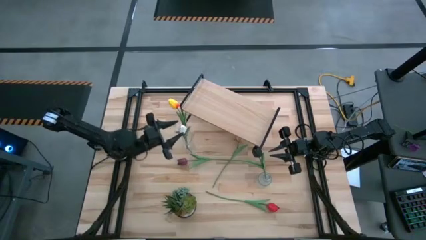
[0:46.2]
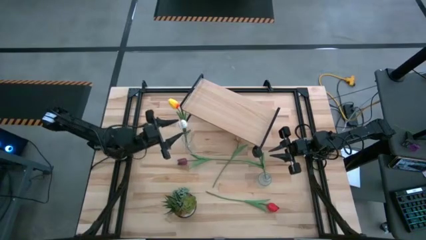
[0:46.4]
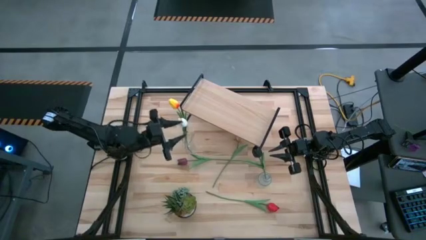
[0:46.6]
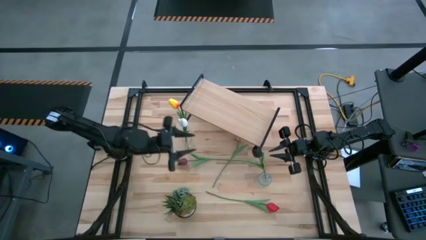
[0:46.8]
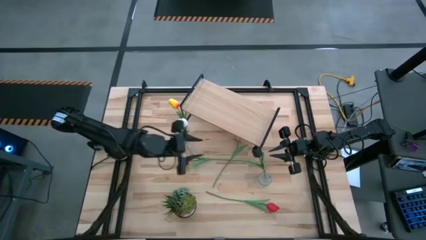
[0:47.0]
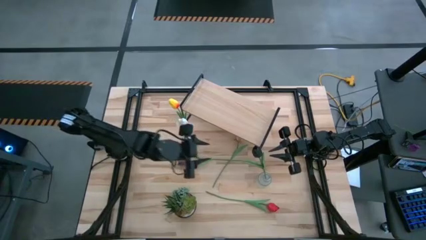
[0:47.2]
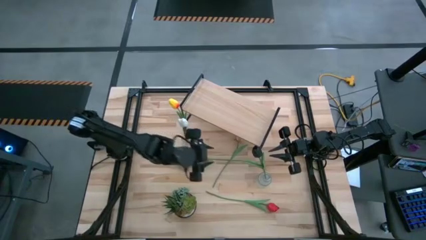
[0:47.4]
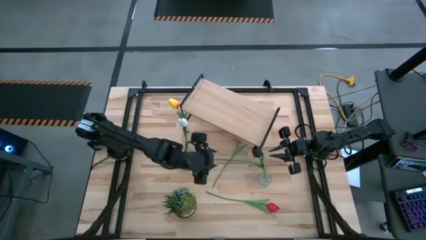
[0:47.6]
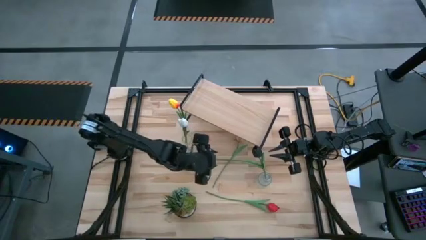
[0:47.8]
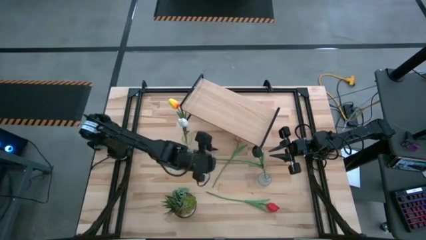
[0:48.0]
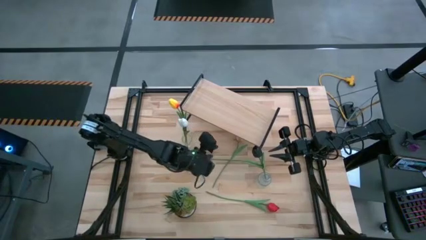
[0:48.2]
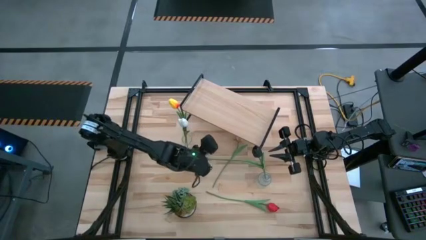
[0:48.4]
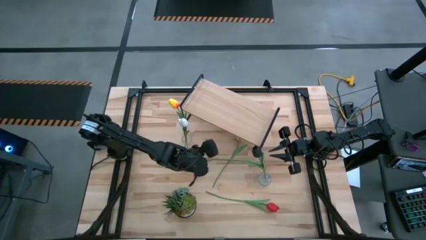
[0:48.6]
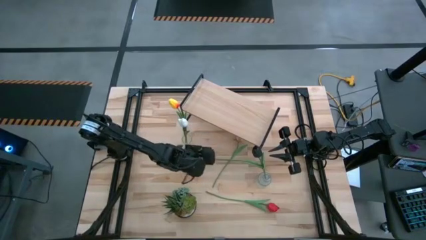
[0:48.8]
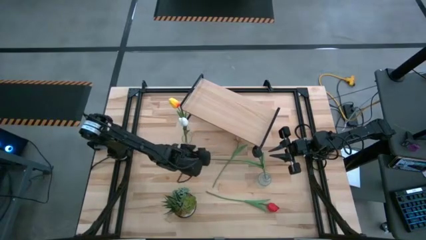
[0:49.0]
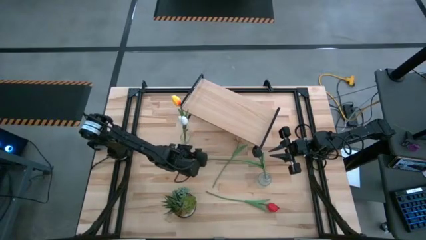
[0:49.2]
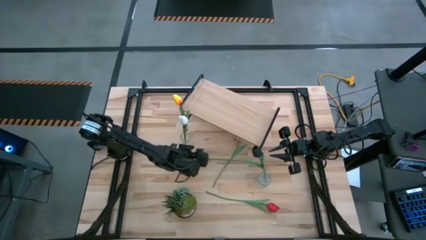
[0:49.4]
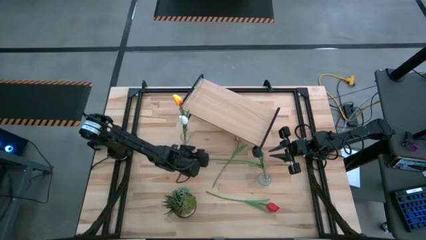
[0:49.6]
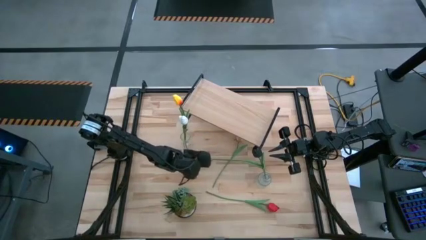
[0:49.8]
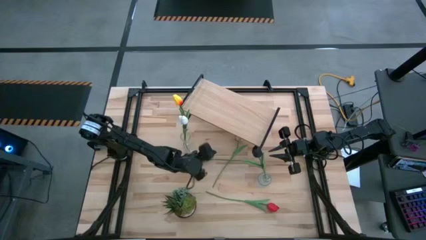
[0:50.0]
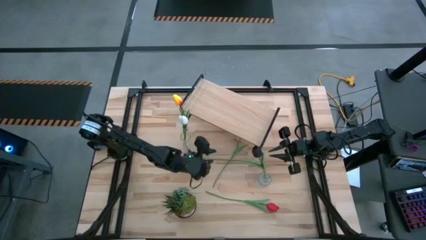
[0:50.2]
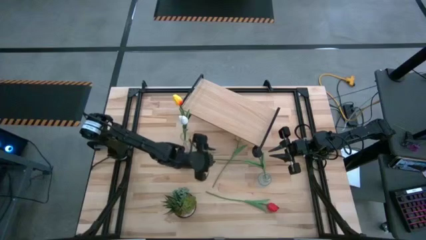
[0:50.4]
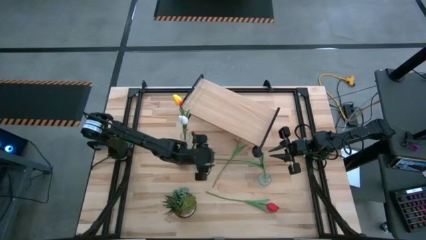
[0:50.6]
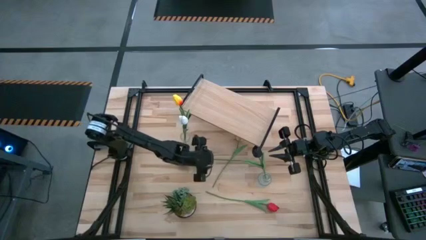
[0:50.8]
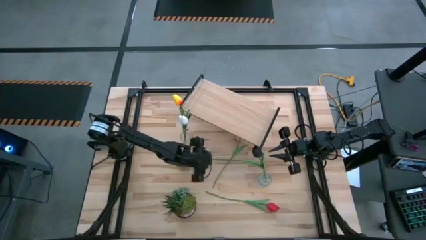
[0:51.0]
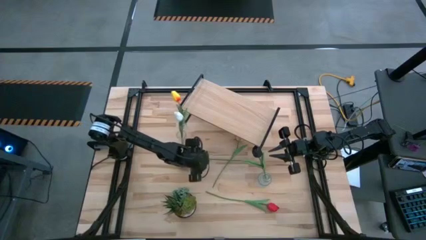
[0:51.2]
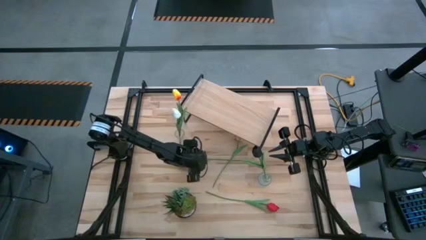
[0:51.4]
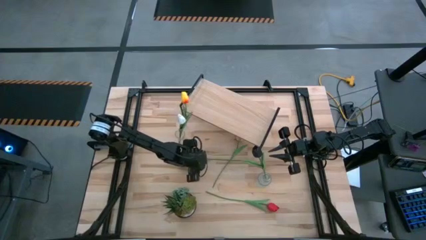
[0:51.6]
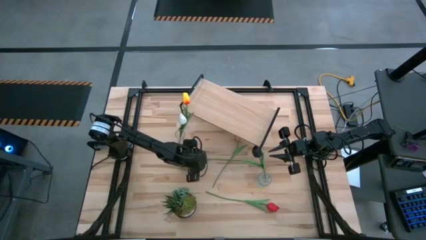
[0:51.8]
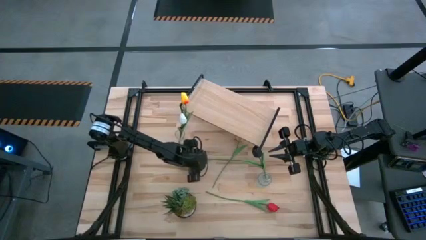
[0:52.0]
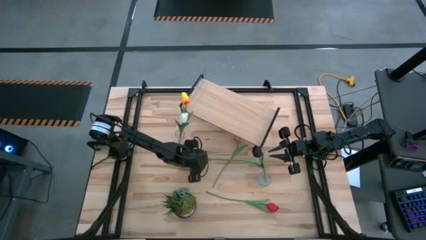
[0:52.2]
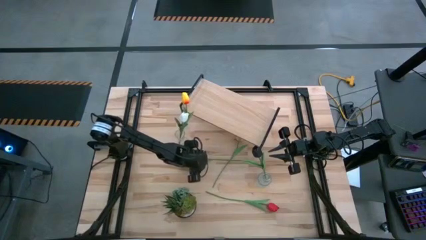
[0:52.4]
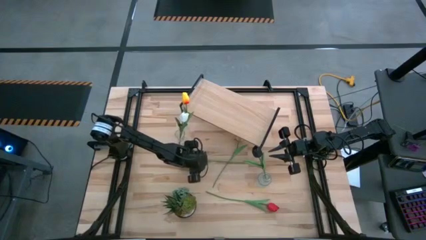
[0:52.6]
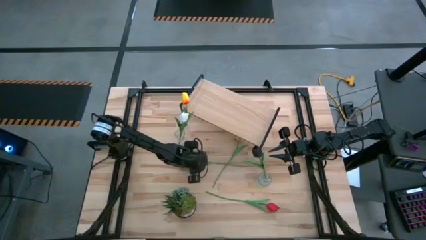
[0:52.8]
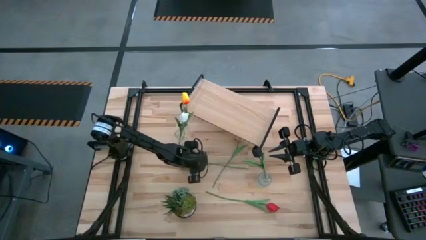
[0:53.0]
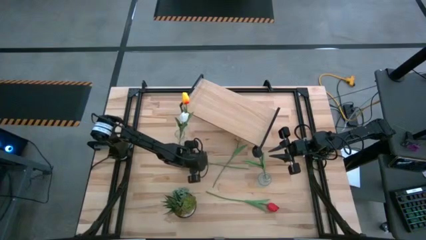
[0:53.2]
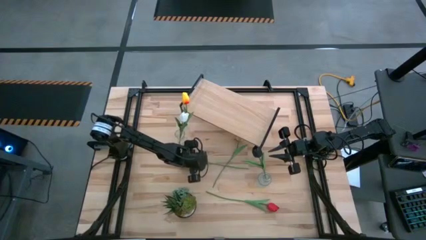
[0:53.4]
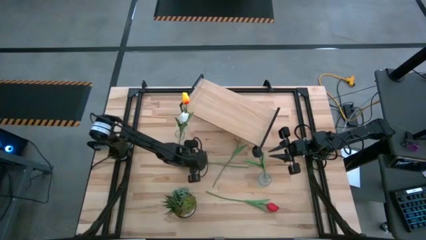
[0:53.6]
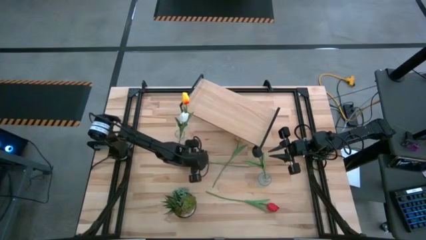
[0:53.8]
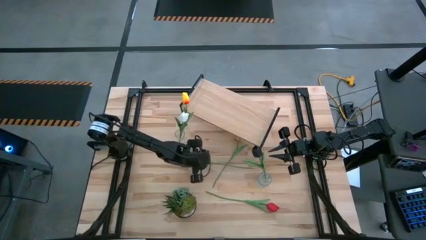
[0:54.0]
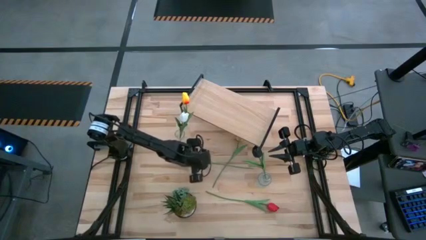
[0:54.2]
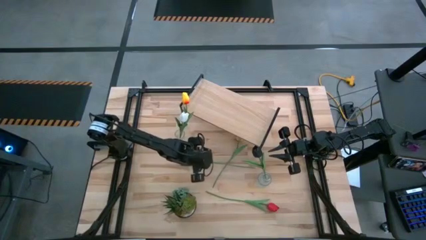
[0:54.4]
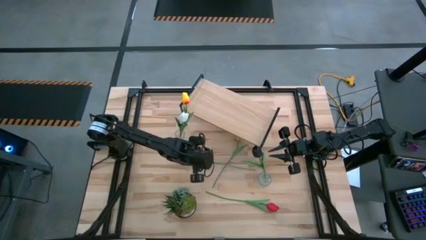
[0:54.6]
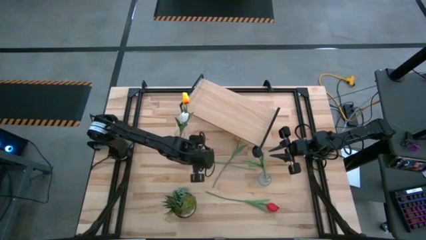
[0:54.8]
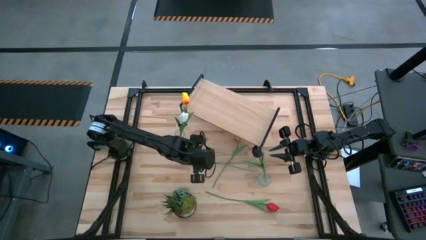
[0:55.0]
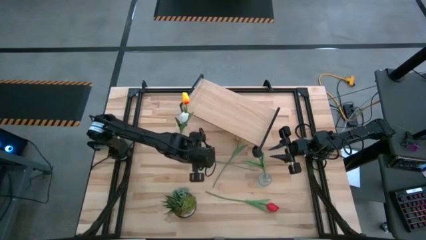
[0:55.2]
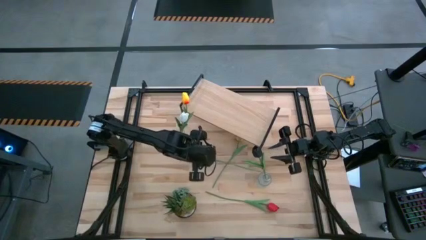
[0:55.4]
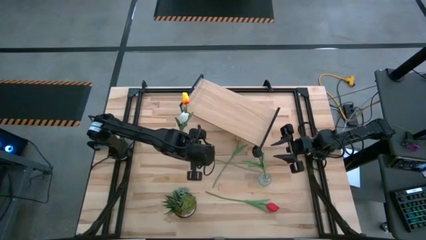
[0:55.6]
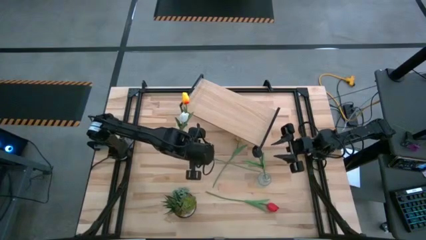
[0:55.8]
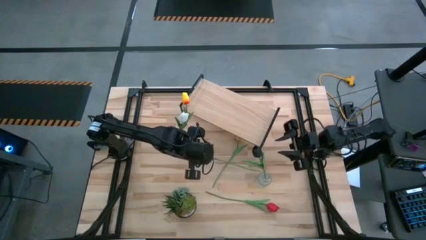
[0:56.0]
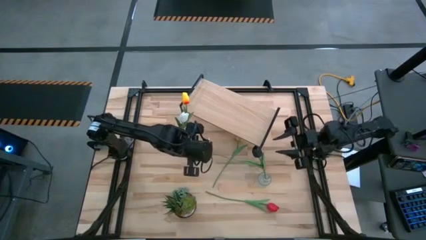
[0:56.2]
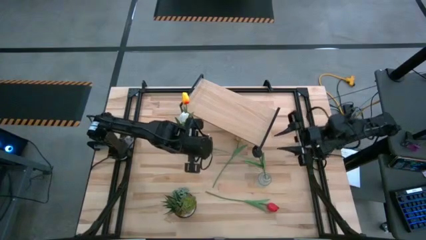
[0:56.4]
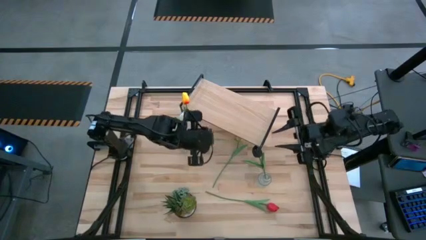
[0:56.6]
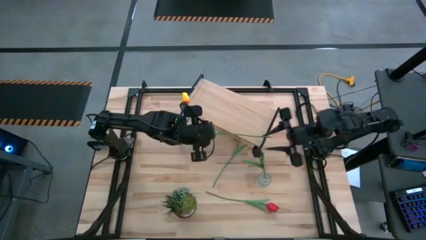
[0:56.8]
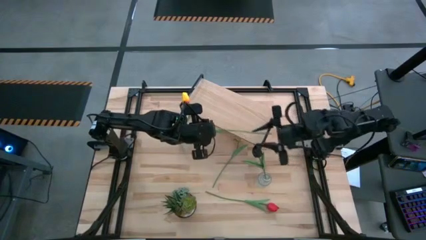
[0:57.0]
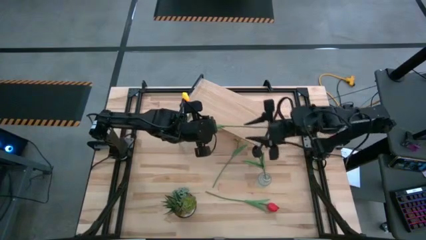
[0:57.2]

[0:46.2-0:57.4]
Task: Pick and place flowers into a vace then onto a shelf
Put the dark red tulip into the left transparent vase

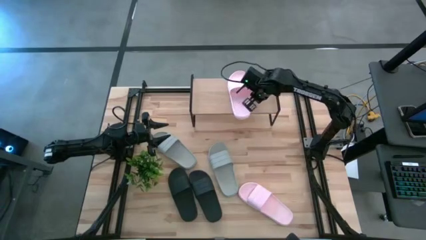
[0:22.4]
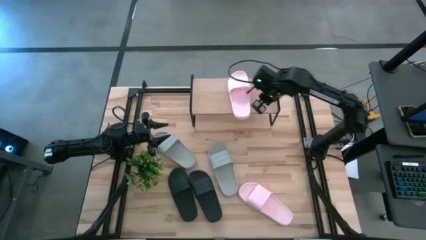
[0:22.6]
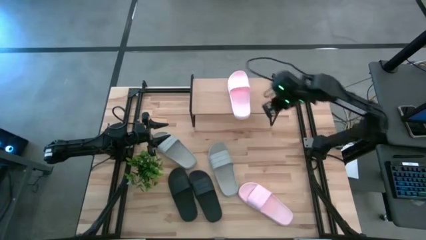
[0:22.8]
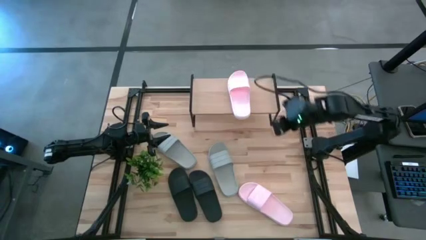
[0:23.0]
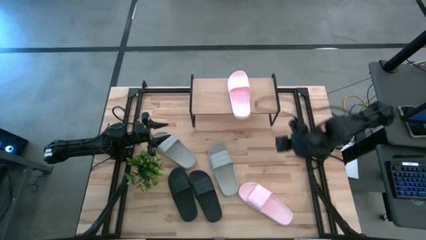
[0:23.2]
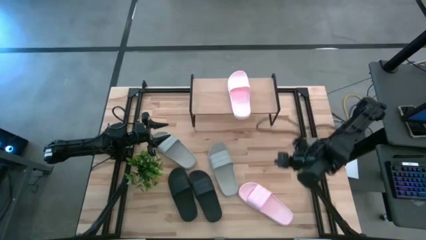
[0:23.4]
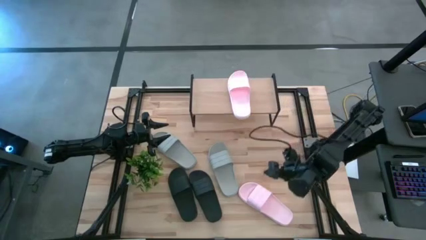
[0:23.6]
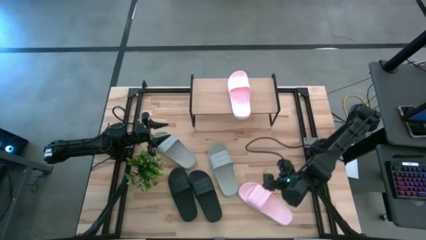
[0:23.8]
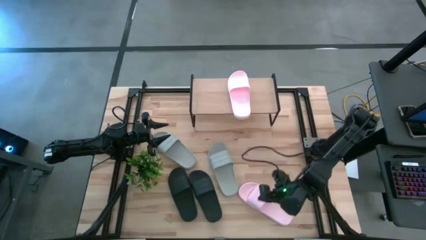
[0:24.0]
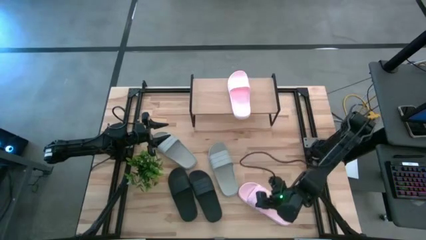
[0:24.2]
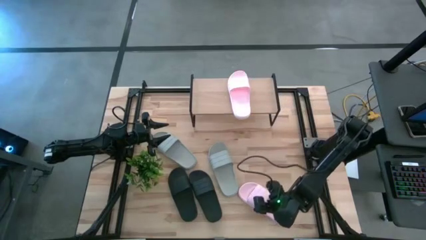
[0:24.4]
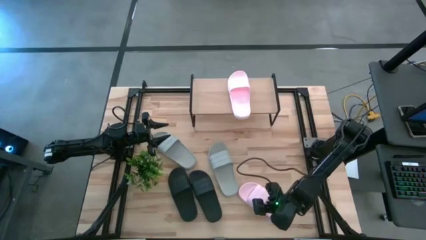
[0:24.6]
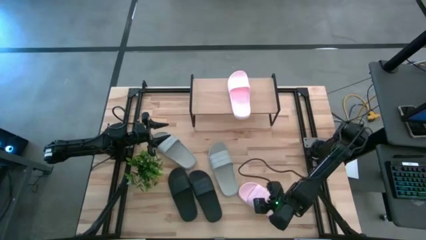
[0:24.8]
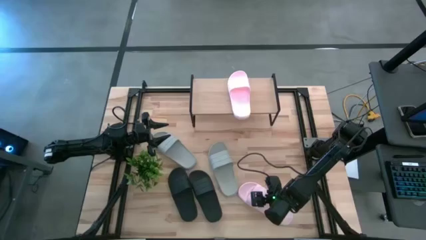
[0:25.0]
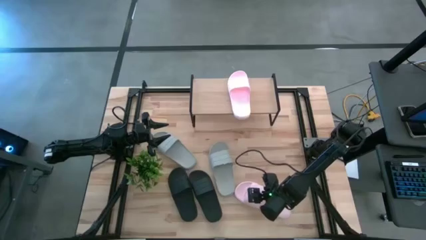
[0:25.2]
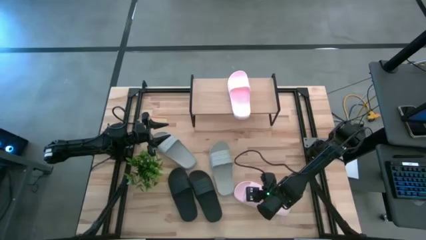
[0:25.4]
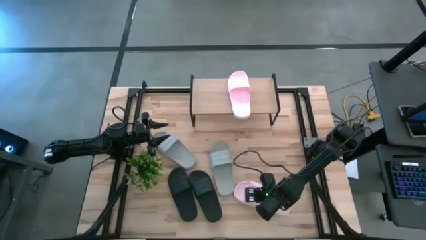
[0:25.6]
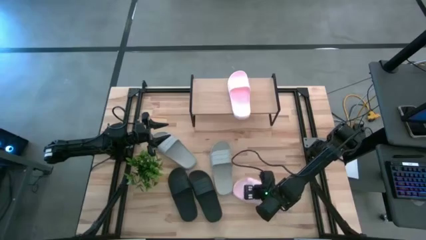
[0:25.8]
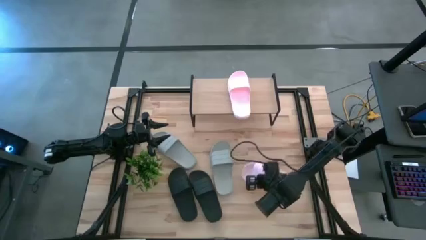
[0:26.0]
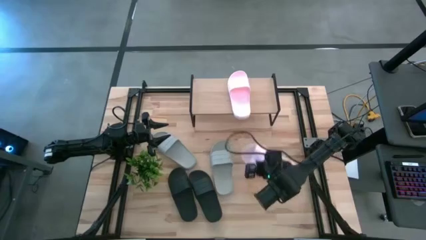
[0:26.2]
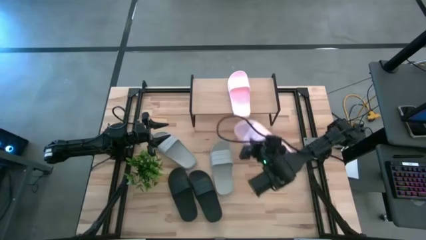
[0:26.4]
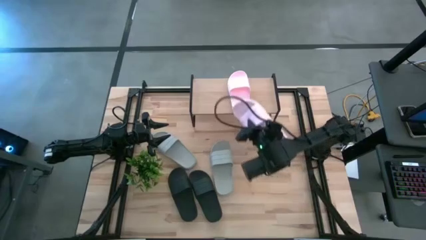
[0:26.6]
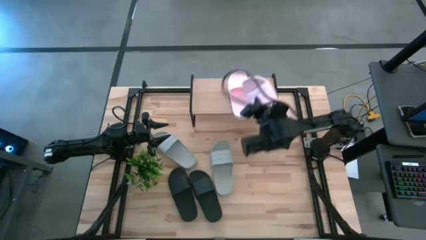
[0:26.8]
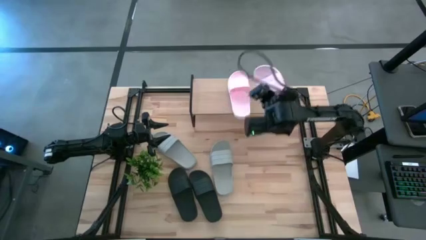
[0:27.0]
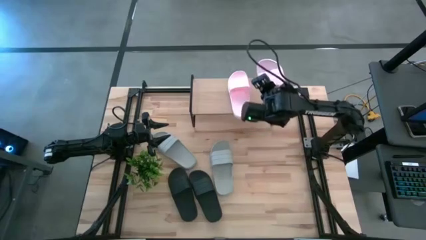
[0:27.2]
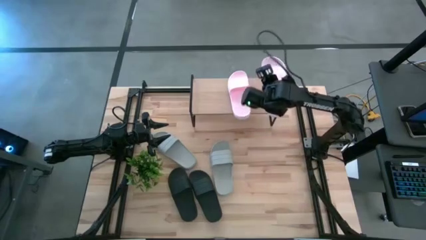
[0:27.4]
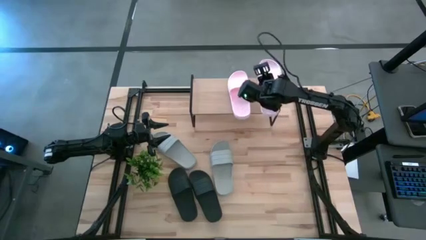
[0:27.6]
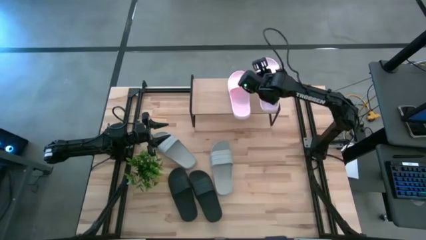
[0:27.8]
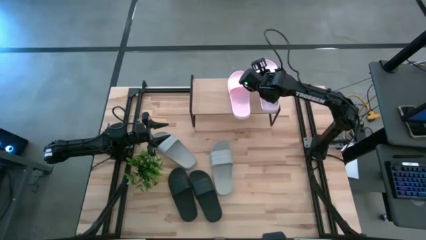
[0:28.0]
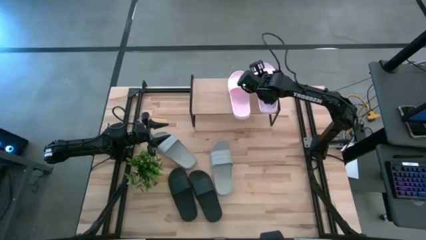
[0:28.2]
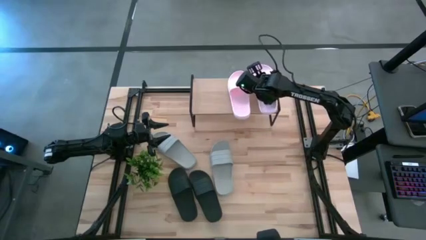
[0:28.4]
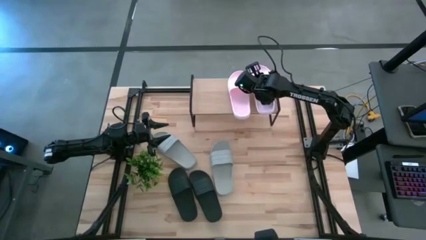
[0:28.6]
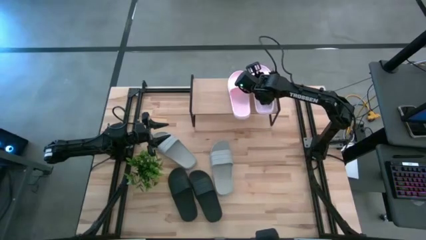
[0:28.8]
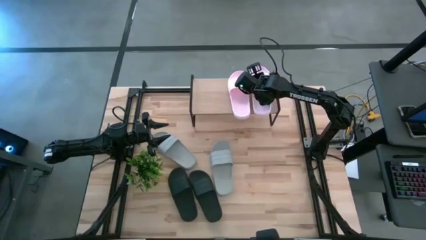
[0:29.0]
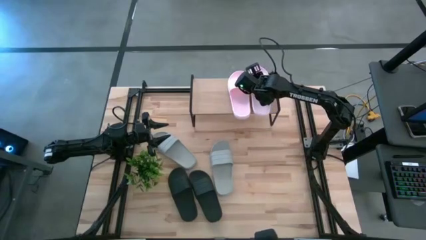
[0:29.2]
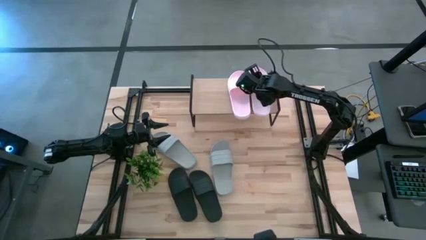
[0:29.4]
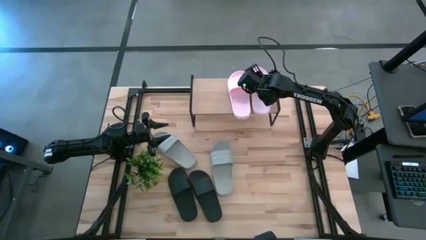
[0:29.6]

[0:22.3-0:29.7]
Task: Pick and place slides into the shelf
Put the pink slide on the shelf
